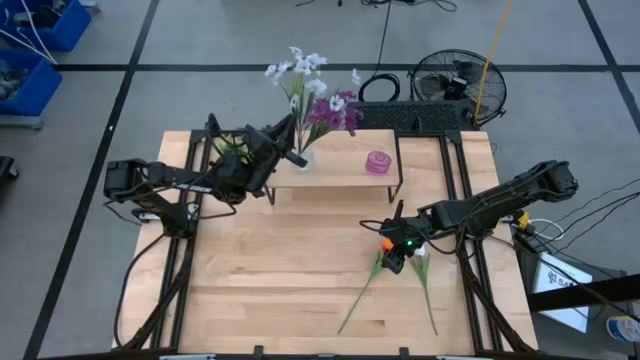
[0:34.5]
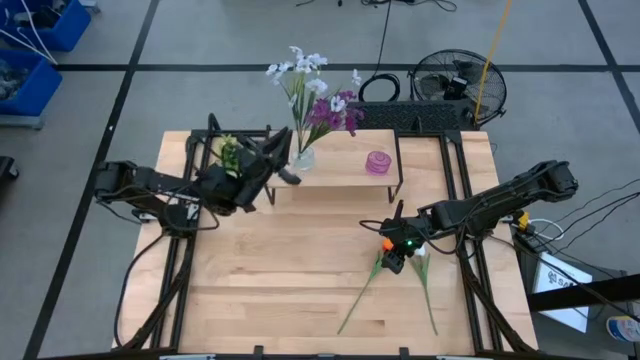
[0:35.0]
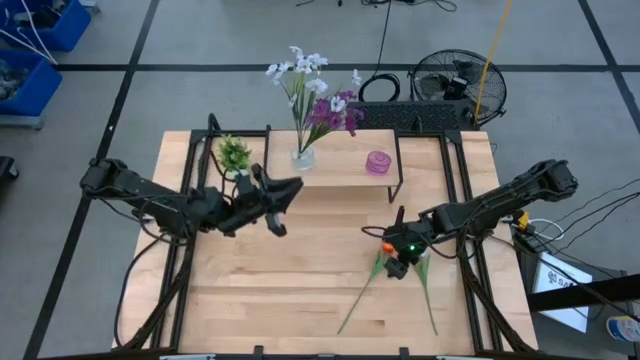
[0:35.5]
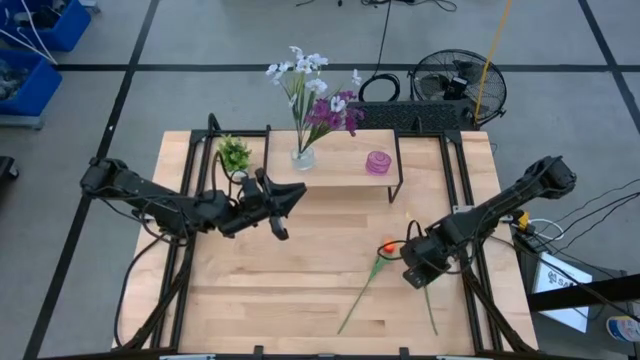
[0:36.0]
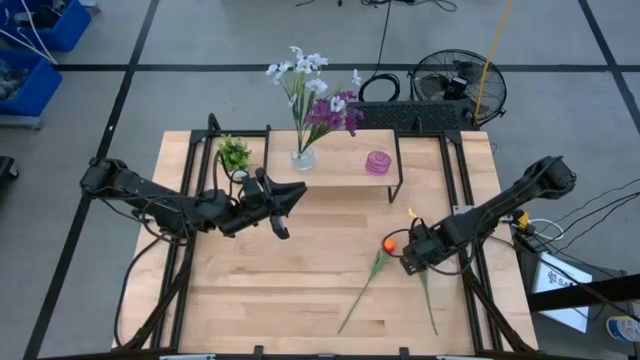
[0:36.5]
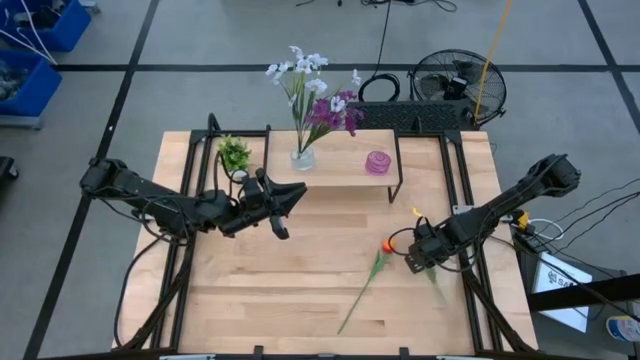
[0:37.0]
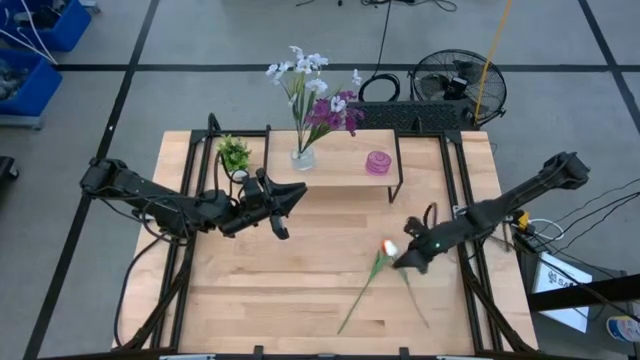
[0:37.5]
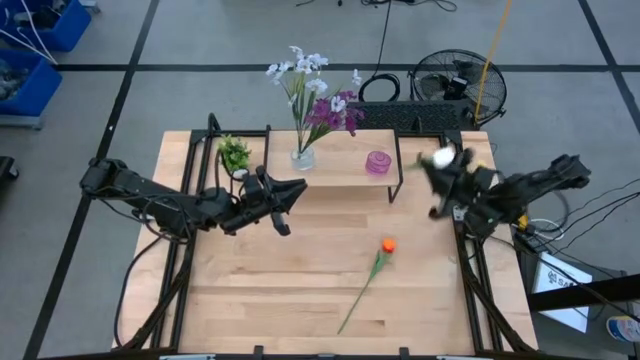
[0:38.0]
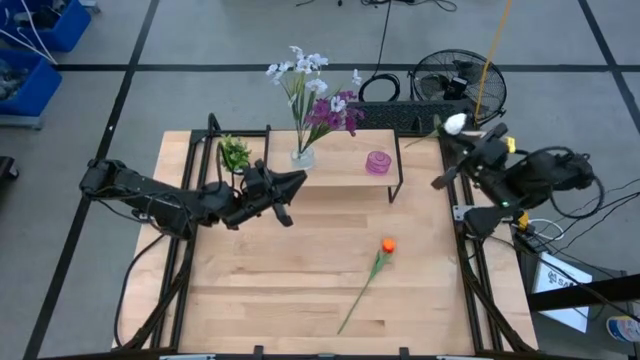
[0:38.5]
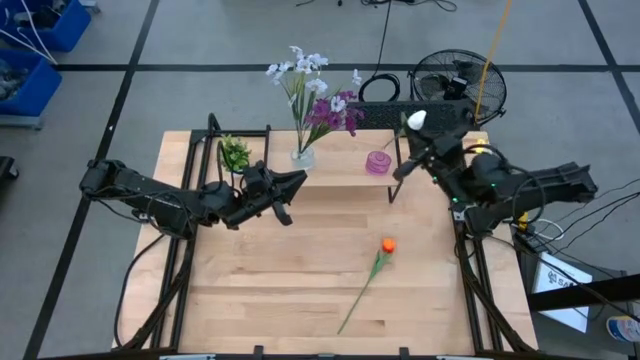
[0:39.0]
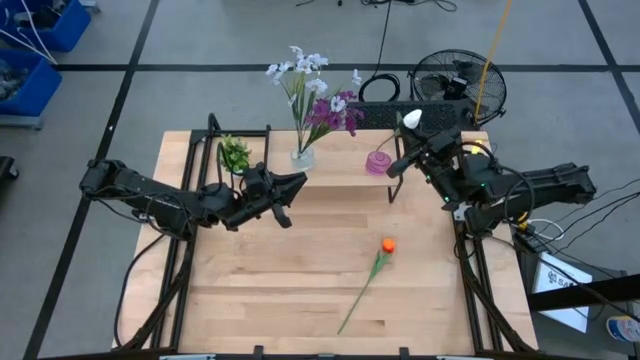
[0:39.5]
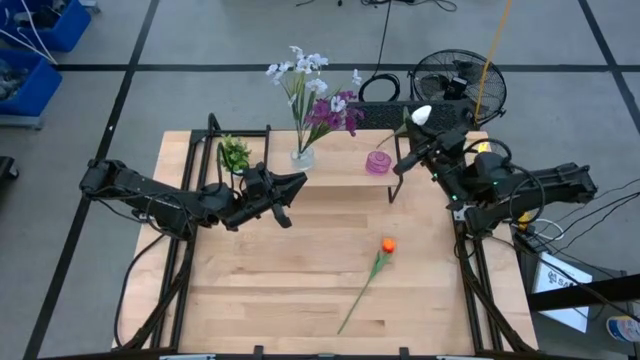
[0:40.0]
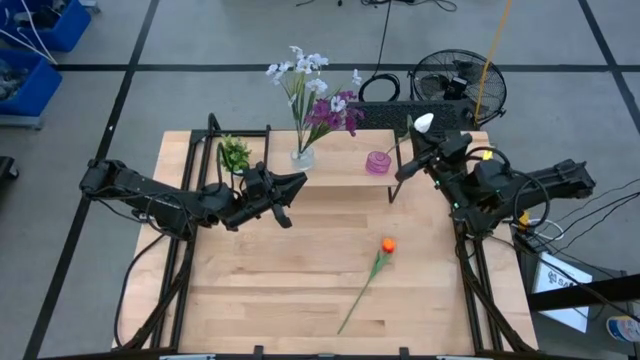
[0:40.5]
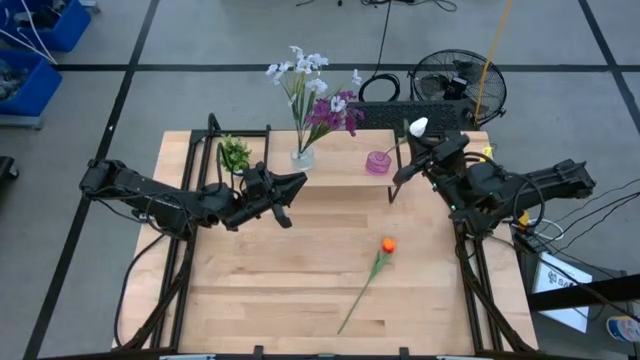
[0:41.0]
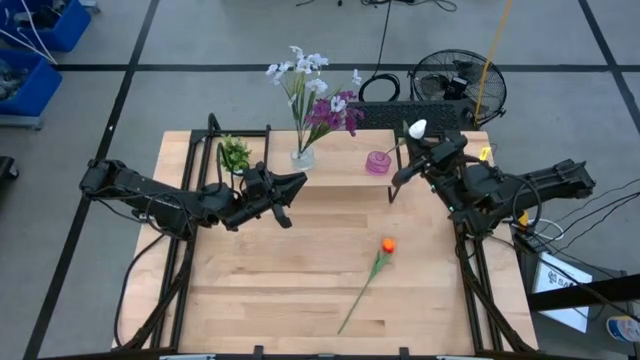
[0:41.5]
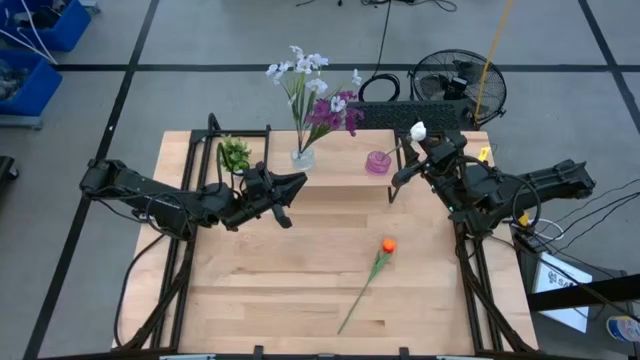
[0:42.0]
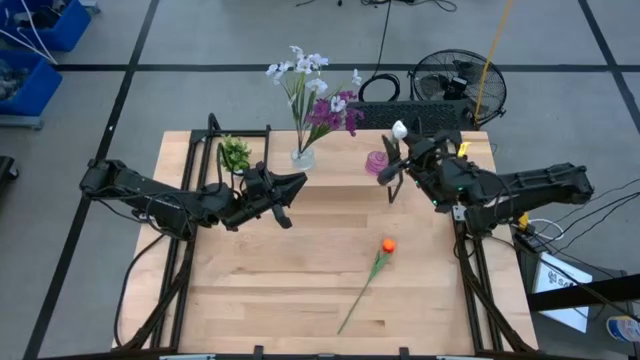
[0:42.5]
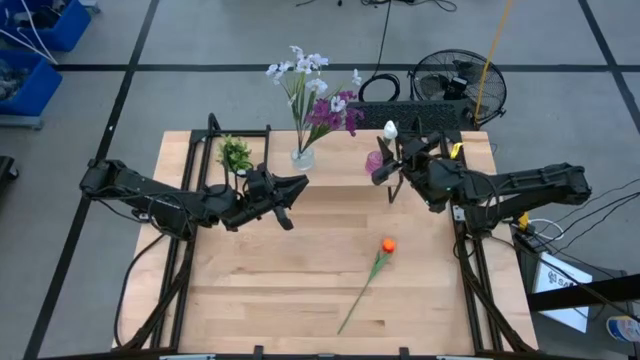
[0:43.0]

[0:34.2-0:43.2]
Task: Pick and place flowers into a vace then onto a shelf
Put the white flower into the violet vase

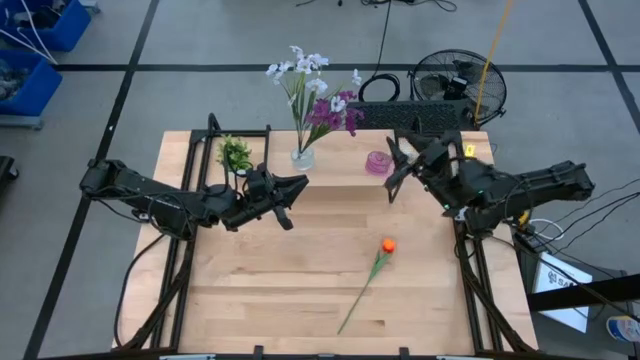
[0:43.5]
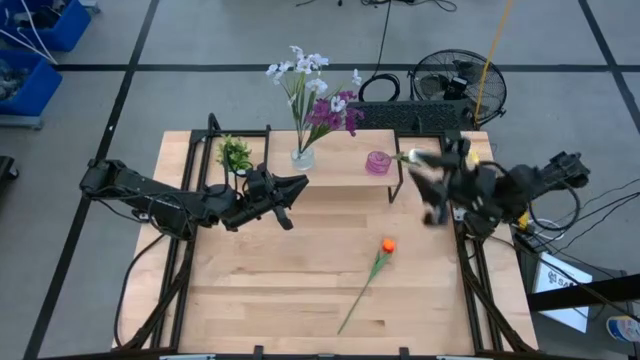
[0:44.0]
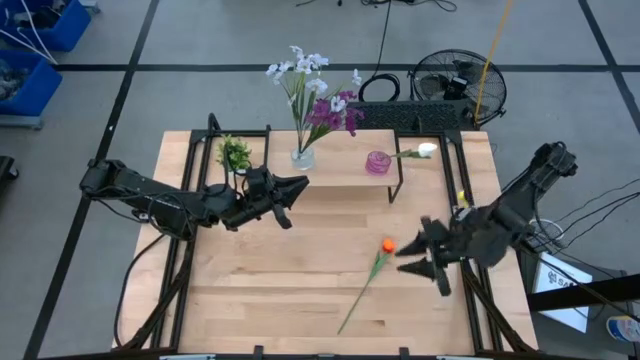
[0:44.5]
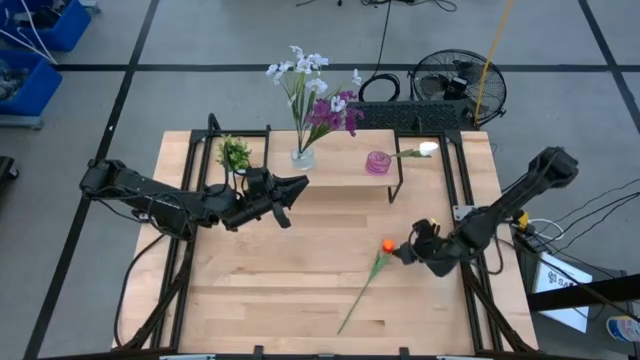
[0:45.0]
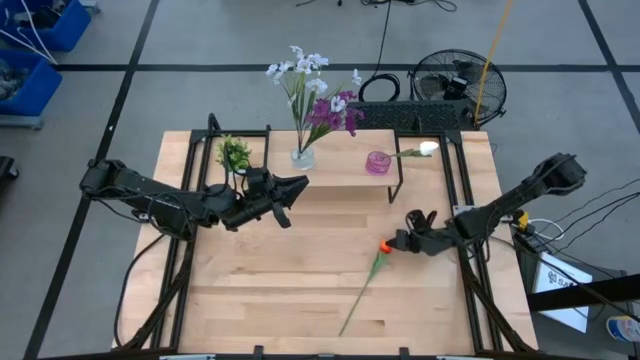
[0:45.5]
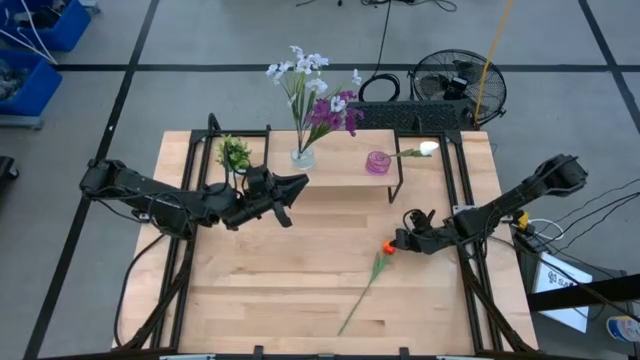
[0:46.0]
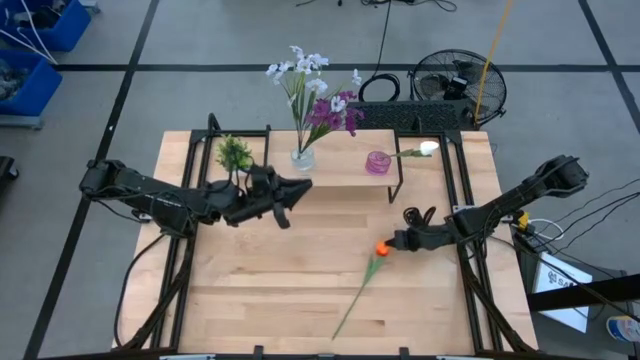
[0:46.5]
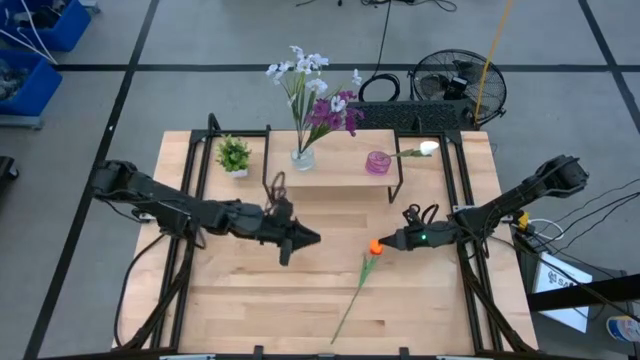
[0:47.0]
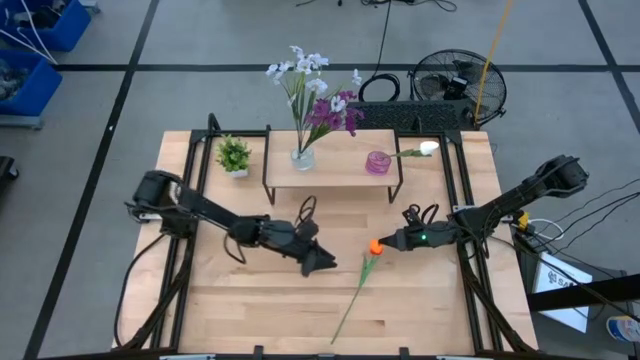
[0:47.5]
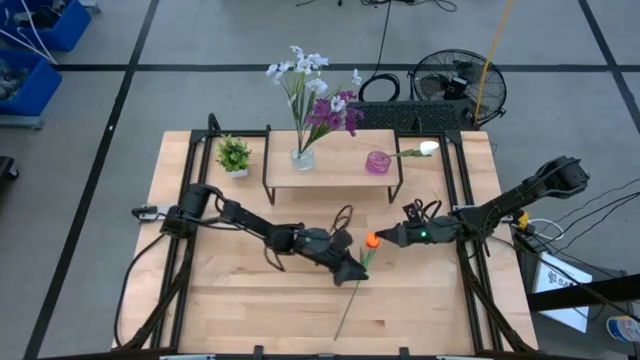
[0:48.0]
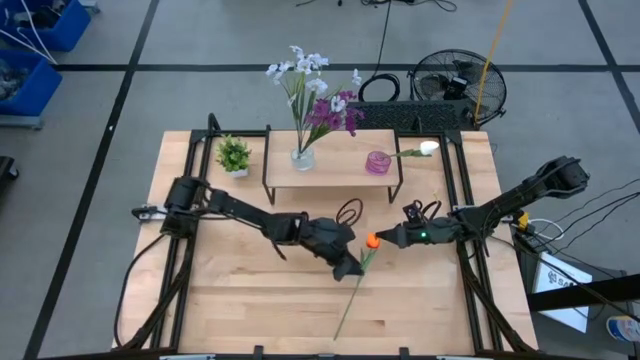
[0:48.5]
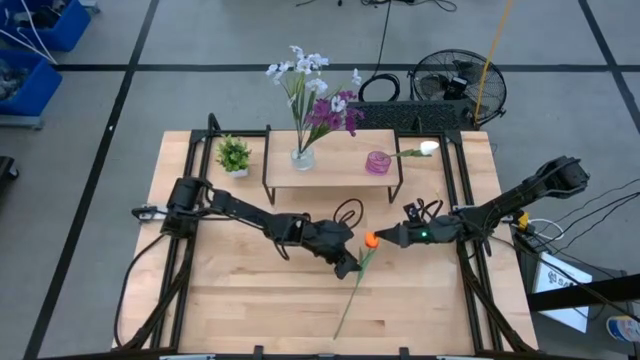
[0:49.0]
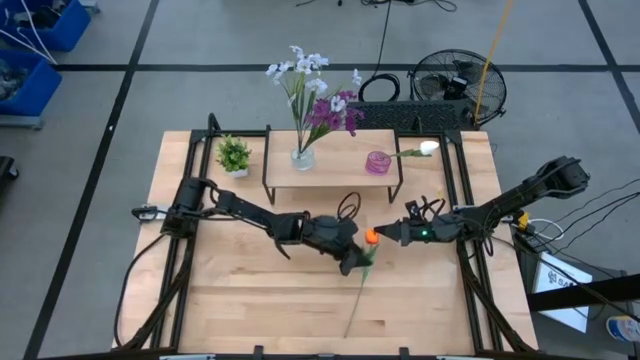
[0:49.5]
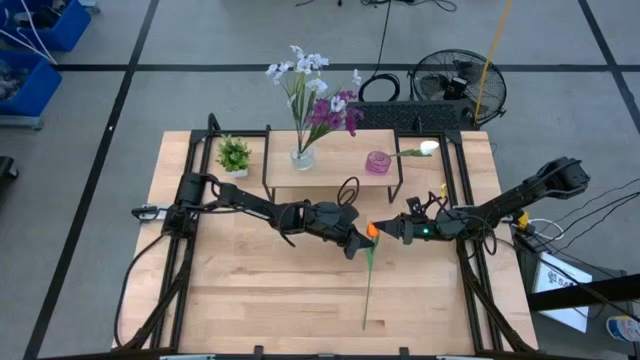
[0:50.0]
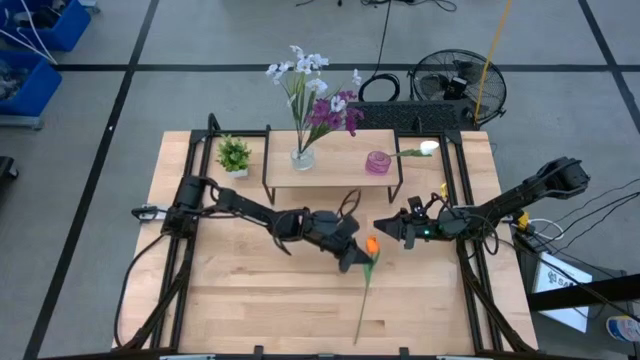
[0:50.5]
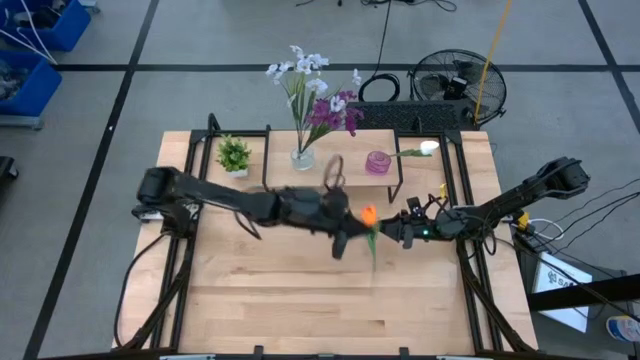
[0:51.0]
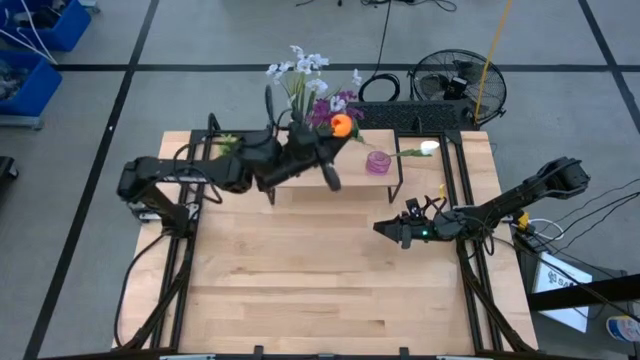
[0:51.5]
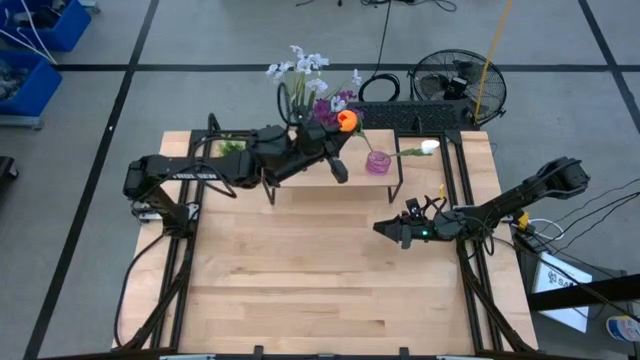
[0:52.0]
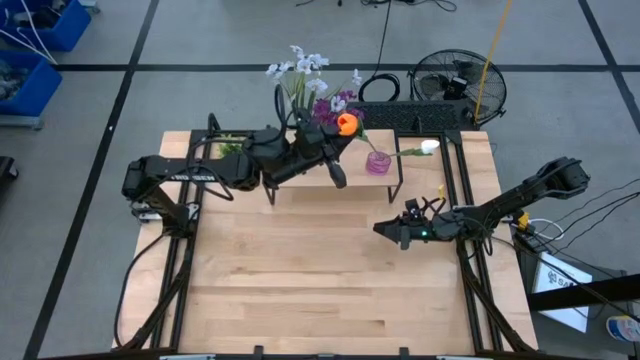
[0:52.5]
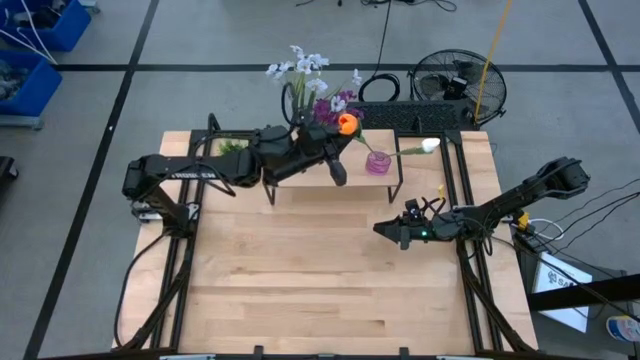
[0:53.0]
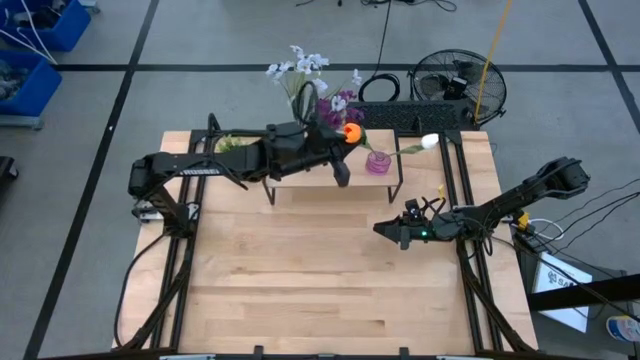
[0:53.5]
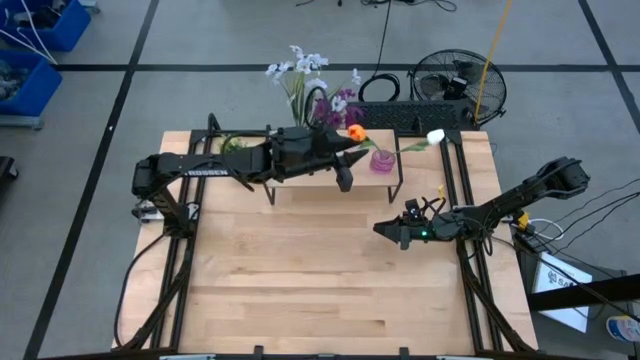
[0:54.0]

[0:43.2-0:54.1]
Put the orange flower into the violet vase

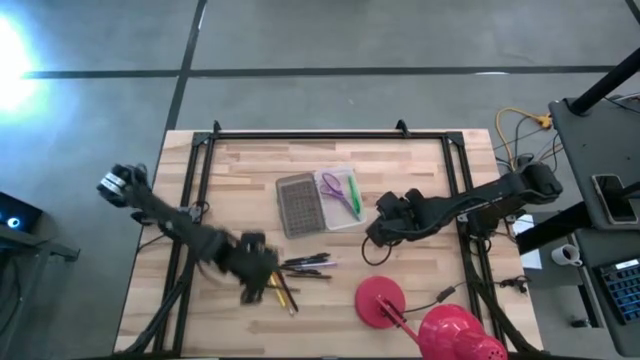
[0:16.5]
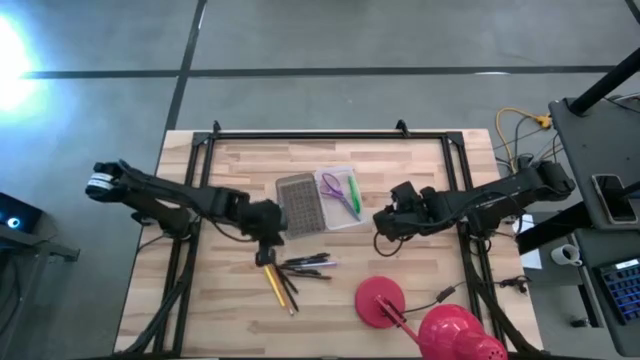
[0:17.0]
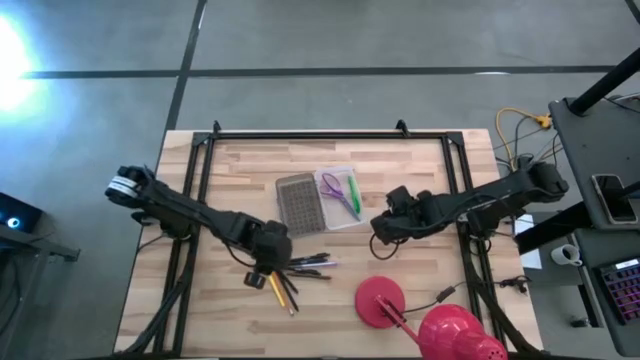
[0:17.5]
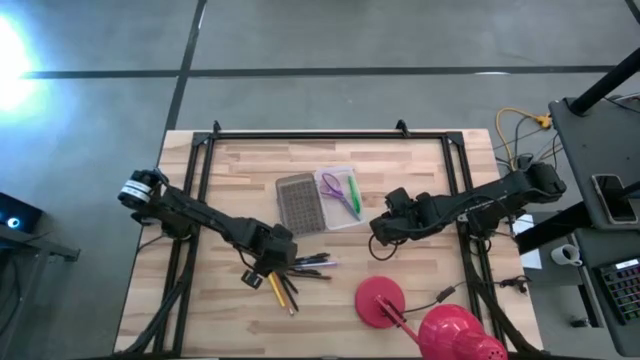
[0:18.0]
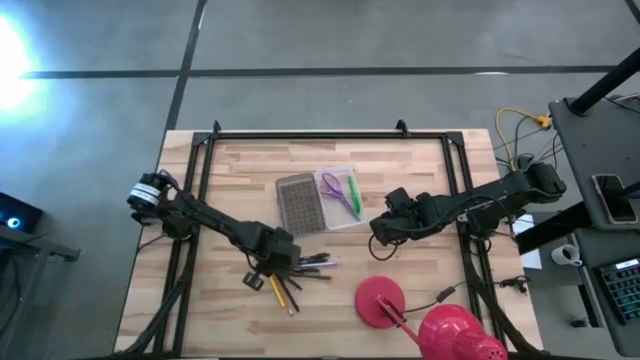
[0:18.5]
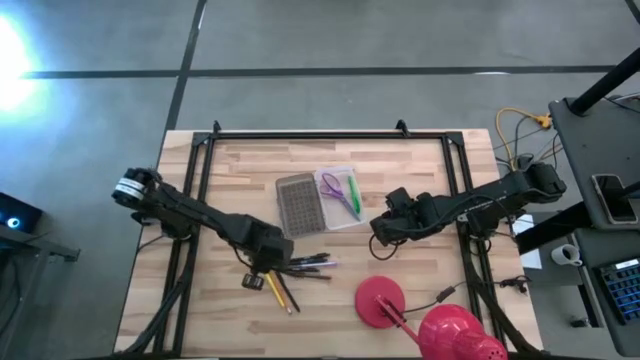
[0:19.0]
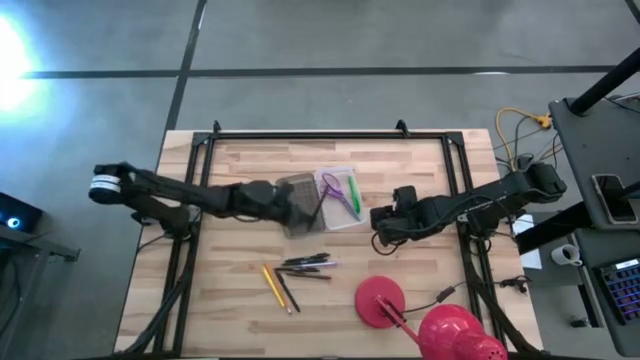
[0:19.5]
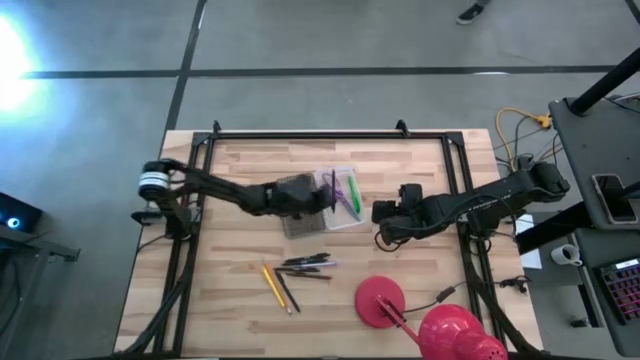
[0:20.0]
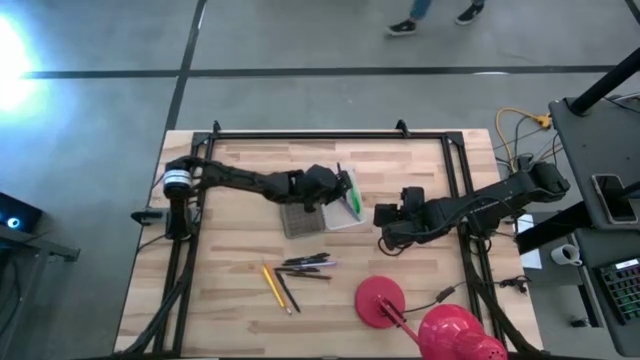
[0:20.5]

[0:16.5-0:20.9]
Task: Pick & place school supplies into a supply box
Put the black pen into the black supply box
